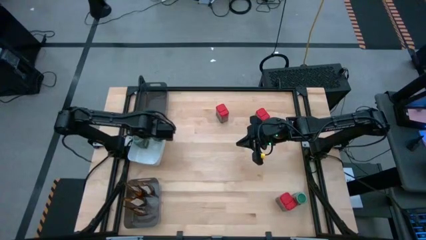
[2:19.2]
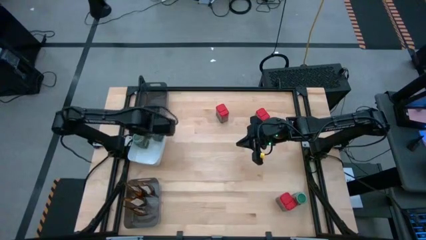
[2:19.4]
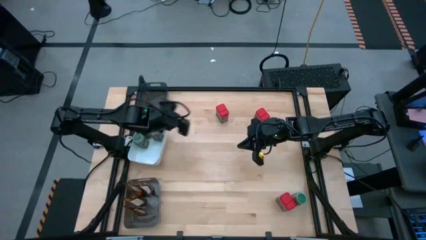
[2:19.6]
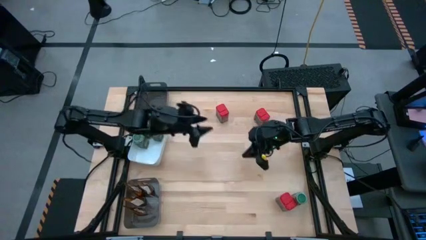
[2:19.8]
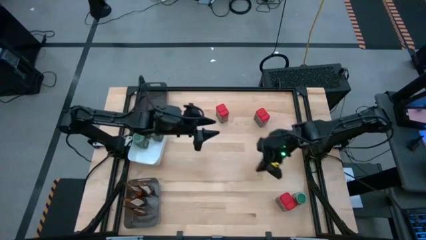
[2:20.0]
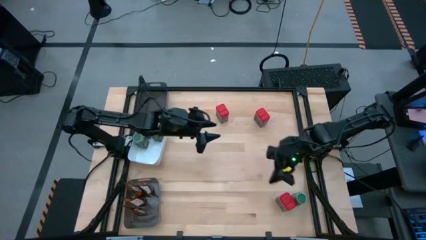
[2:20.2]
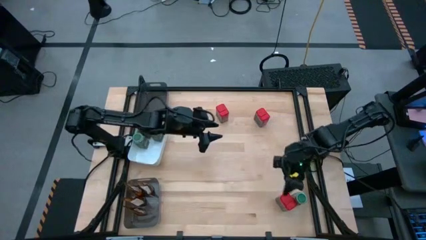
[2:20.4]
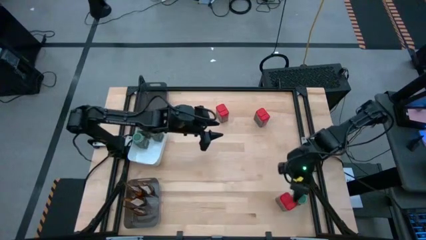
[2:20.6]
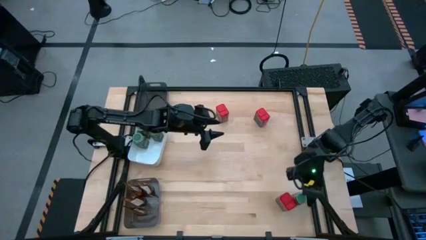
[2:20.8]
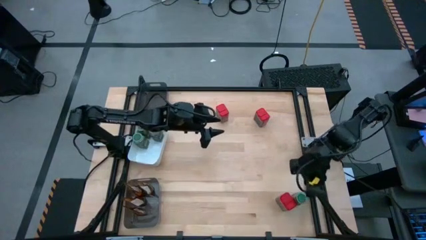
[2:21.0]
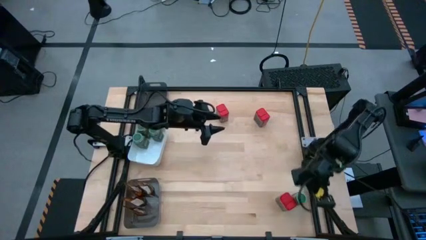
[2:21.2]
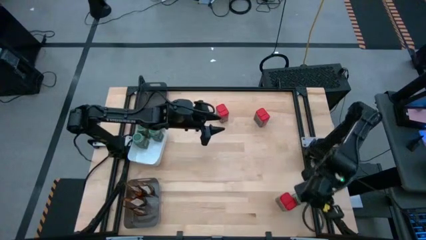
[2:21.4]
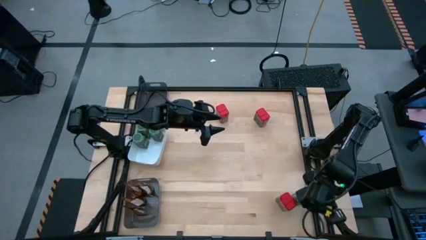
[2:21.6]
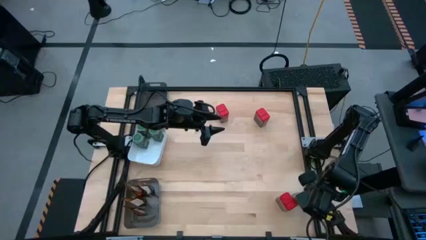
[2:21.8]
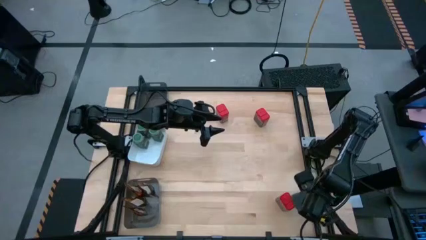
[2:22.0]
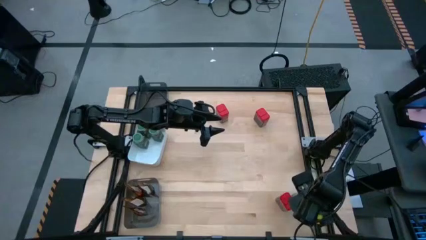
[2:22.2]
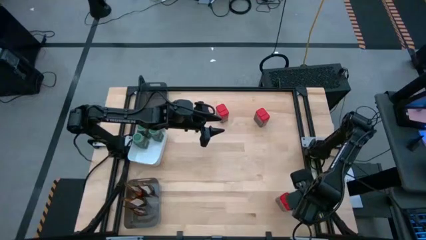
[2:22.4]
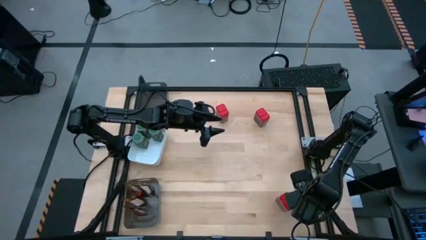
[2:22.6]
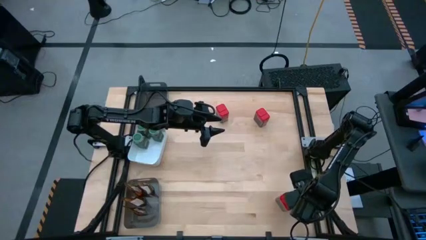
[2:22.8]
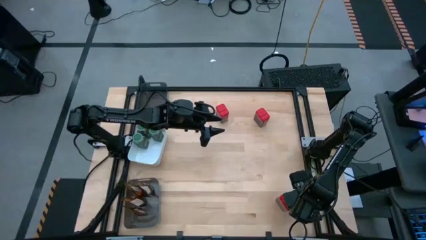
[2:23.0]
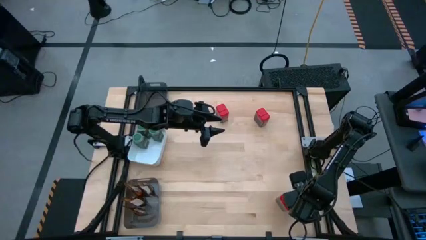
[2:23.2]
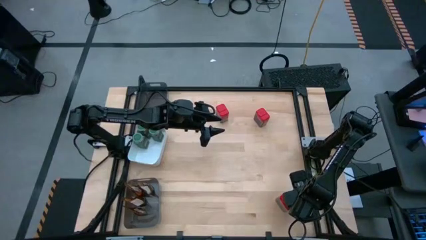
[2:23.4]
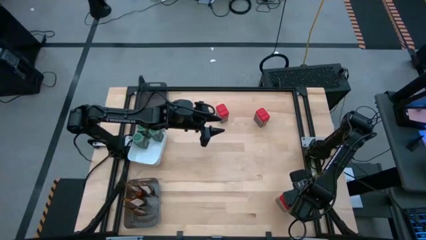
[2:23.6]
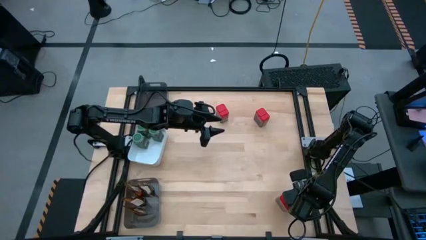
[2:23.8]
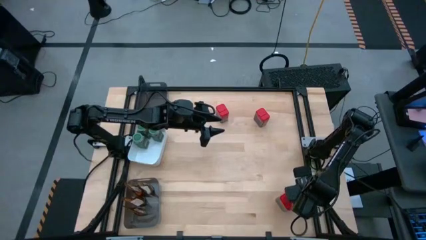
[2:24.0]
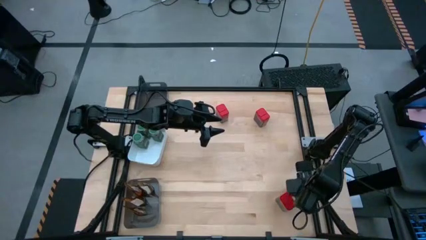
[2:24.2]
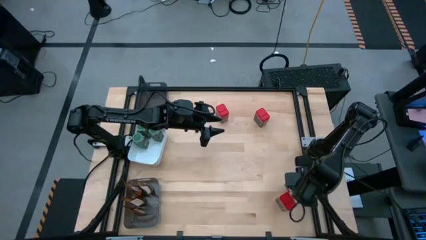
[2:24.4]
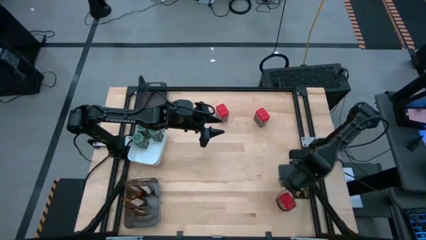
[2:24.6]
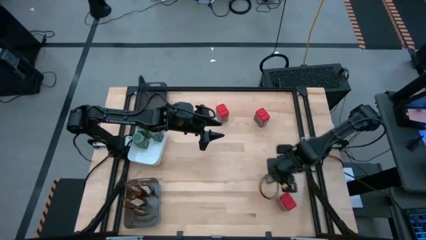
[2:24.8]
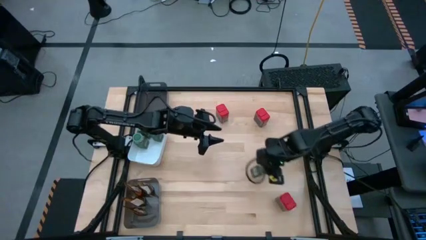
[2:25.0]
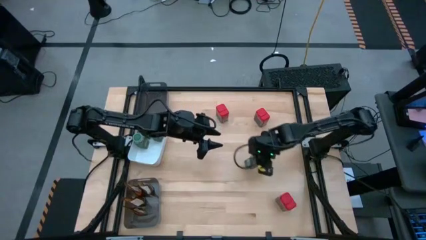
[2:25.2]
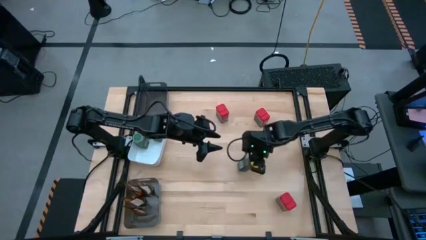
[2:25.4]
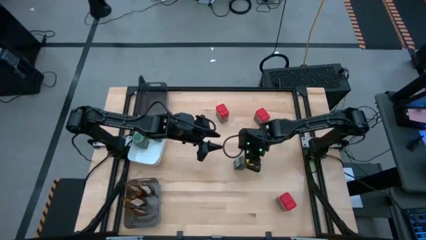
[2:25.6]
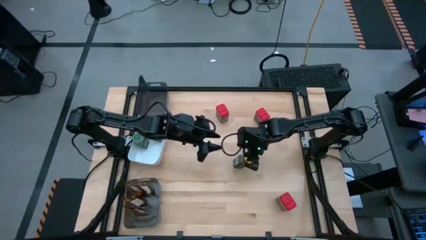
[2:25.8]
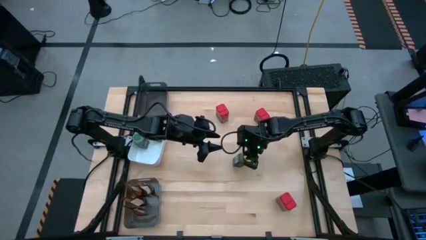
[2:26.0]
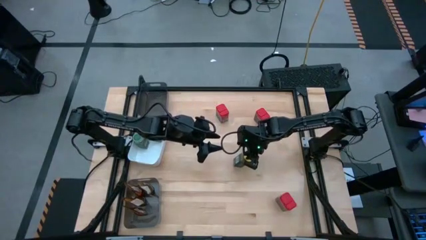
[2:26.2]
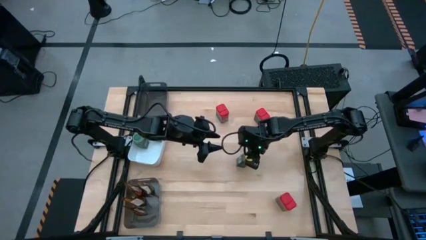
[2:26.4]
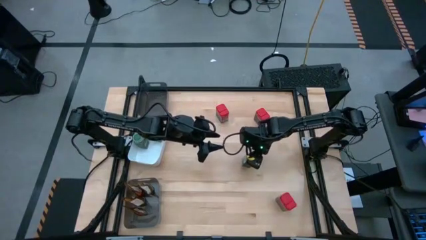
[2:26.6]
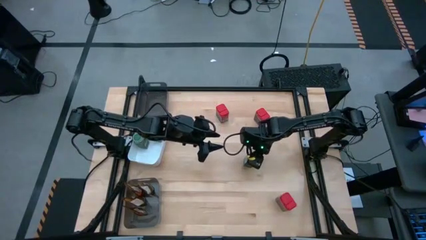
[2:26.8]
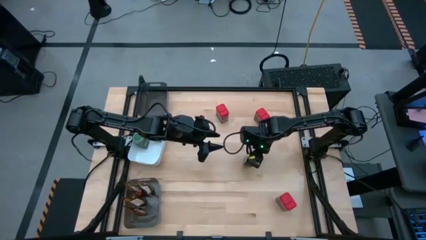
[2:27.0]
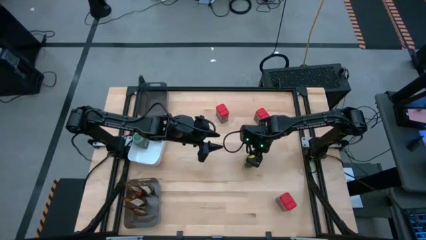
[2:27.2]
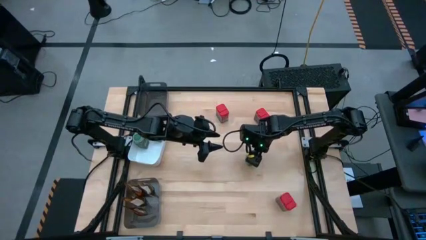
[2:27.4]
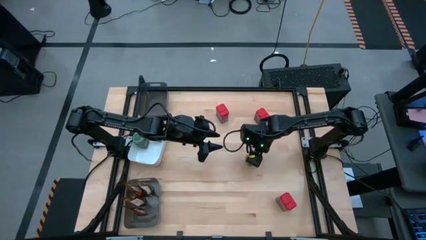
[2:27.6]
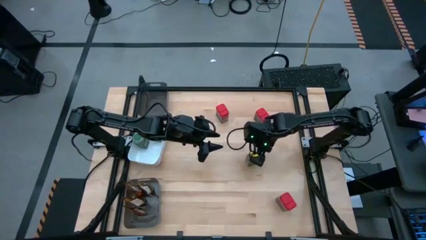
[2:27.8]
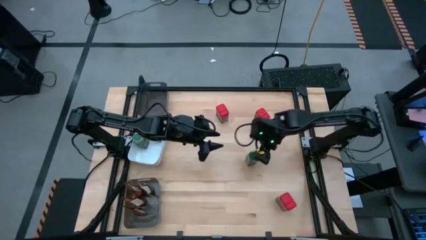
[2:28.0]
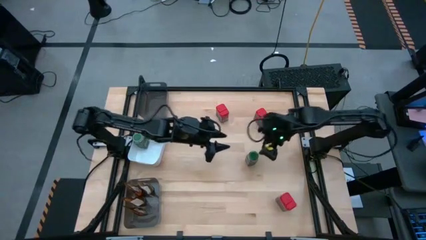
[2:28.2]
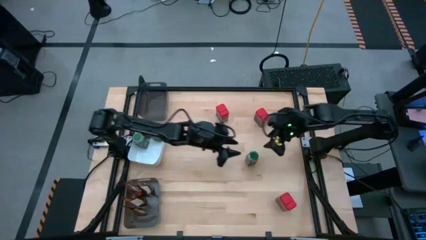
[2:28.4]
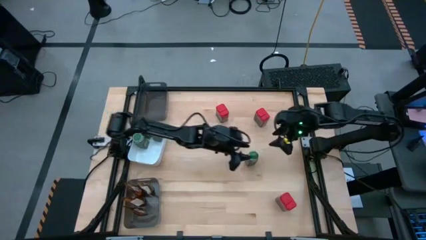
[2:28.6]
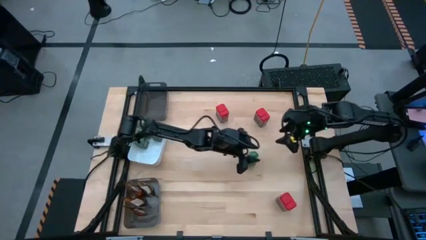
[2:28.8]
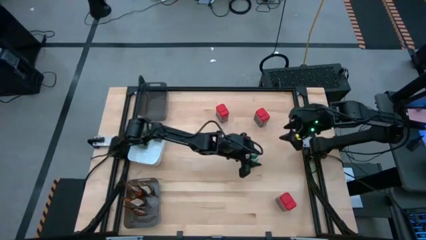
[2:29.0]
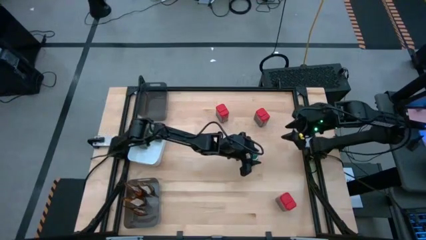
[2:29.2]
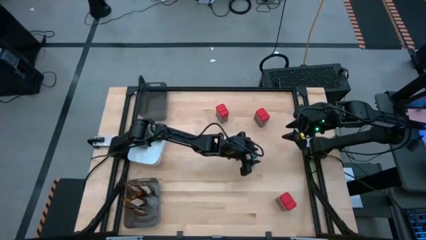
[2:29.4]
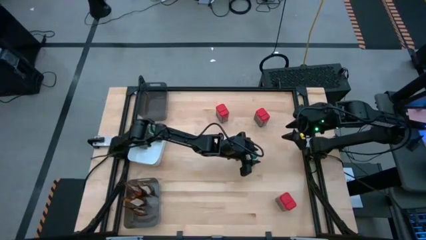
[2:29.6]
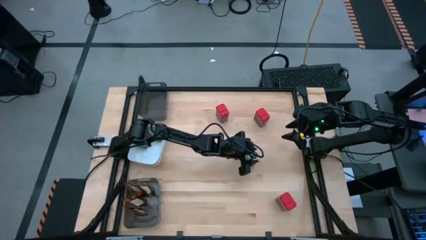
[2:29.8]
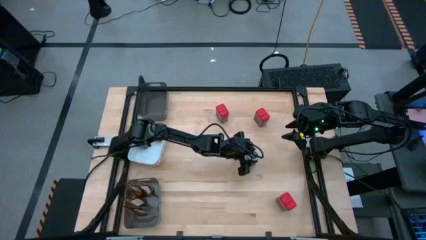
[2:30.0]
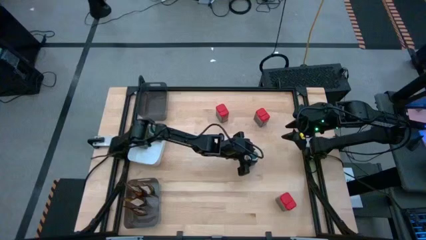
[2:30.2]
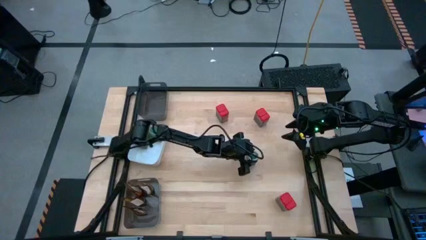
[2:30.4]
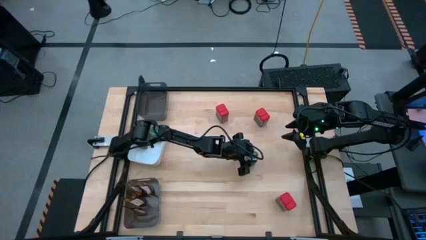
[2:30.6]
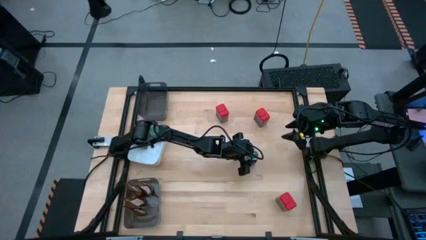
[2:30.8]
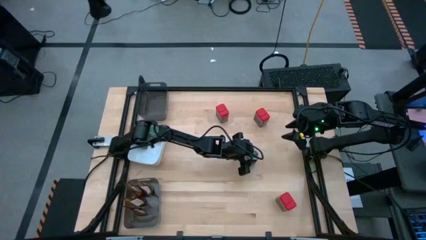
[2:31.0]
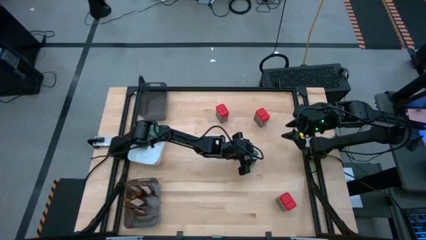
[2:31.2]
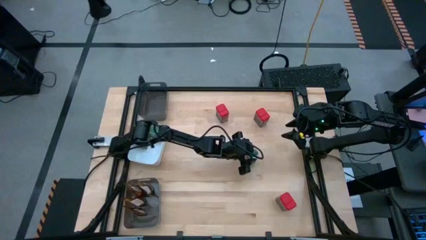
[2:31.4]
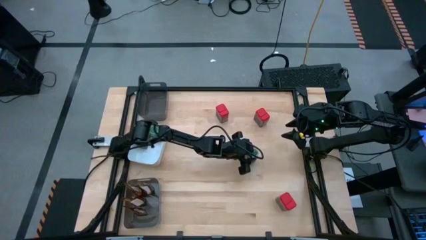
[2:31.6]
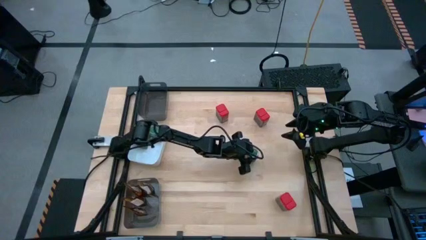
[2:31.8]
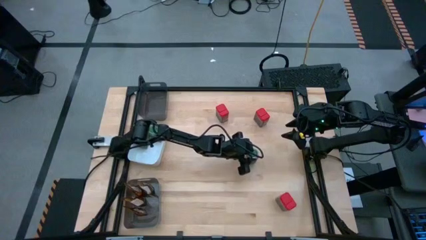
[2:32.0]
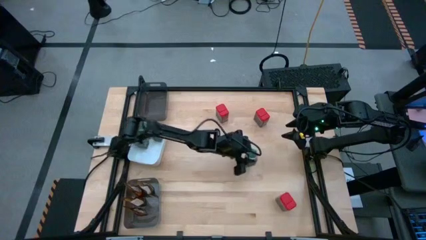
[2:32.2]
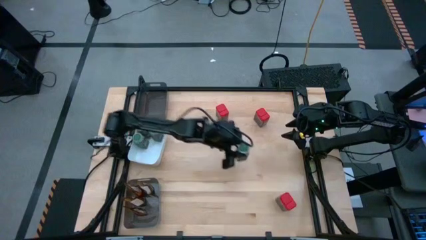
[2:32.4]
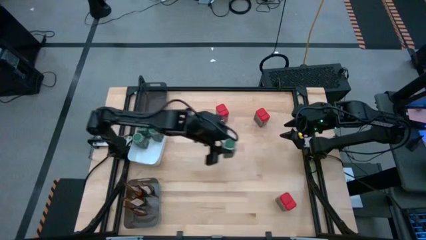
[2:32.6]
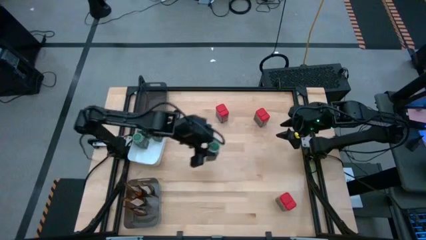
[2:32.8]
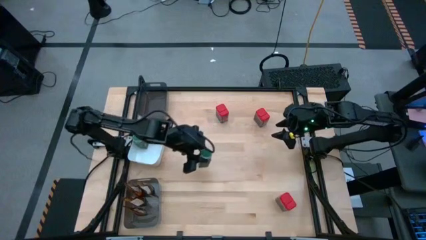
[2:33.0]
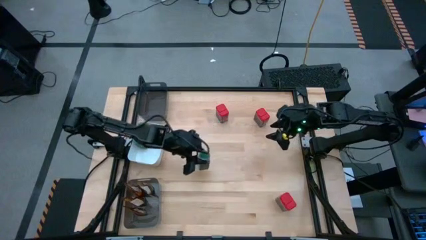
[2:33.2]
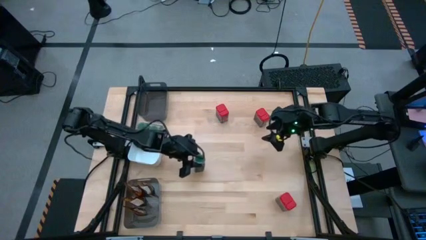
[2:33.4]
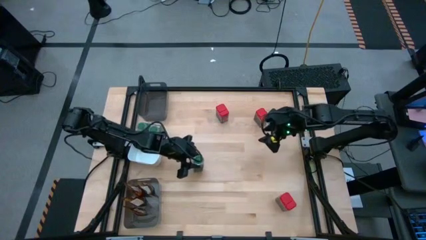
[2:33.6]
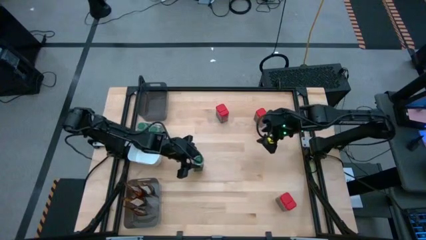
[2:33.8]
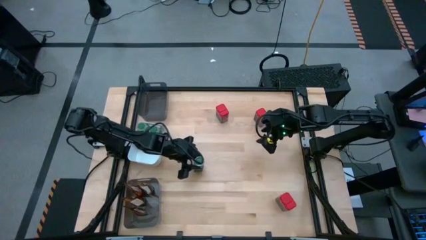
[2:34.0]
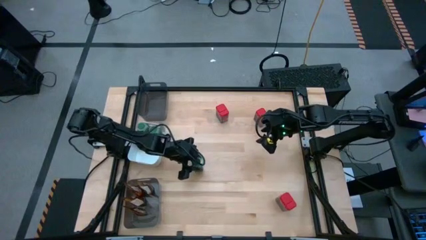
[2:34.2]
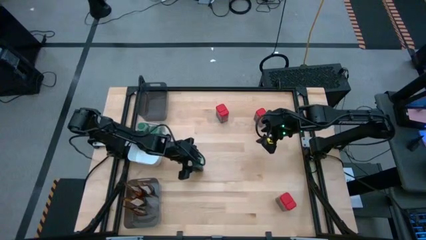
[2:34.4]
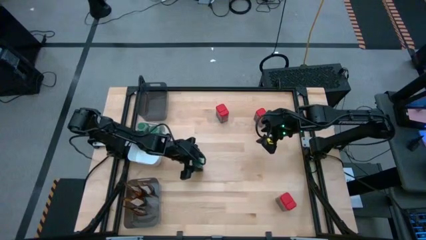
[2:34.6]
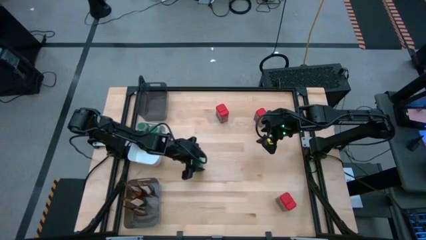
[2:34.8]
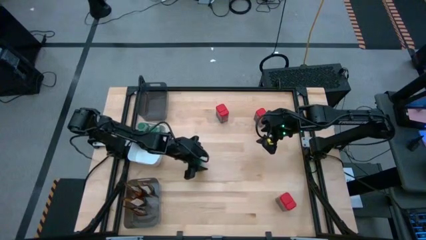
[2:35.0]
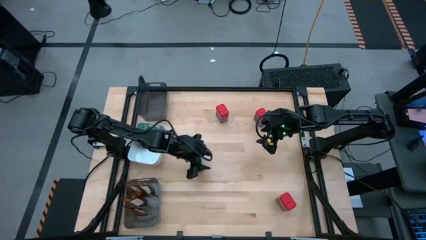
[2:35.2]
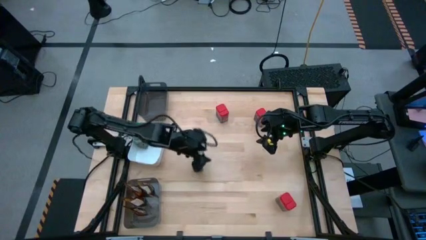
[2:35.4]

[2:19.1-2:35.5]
Task: Sort spices by type
Put the green bottle seasoning into the white bin

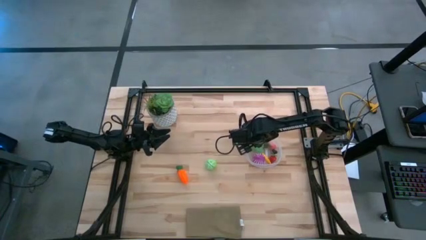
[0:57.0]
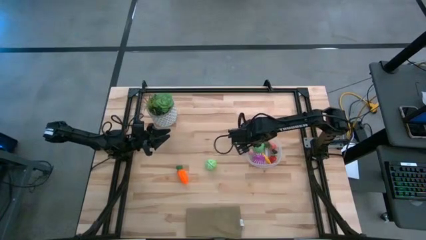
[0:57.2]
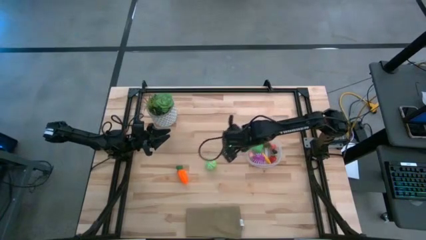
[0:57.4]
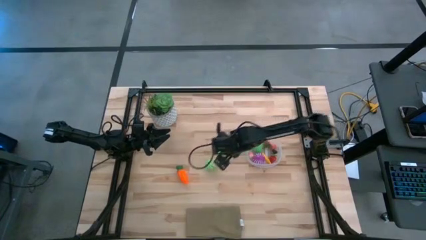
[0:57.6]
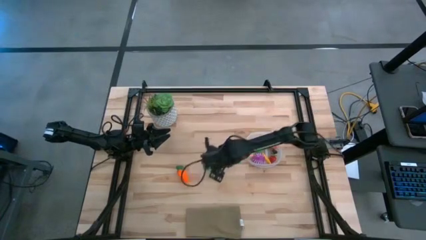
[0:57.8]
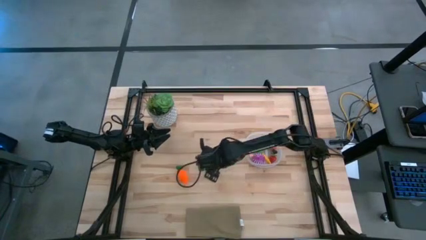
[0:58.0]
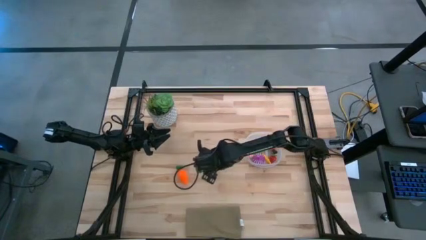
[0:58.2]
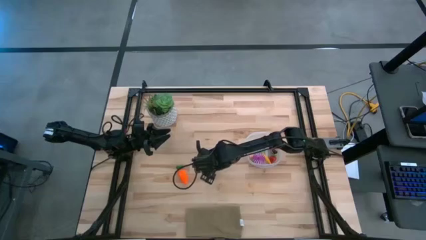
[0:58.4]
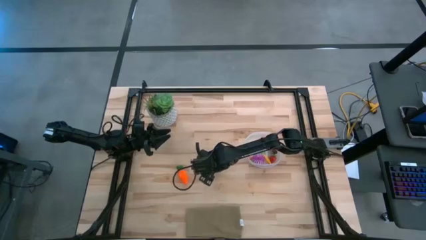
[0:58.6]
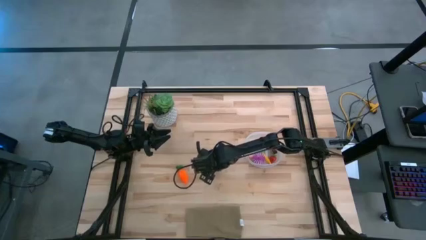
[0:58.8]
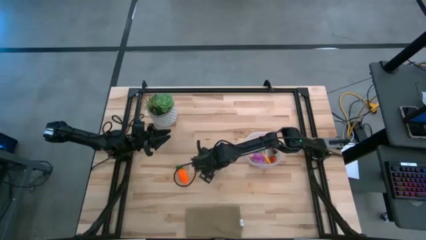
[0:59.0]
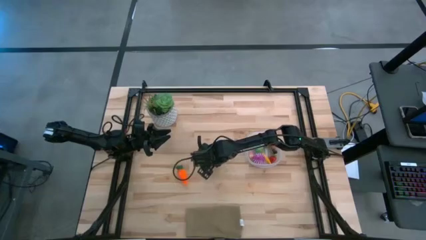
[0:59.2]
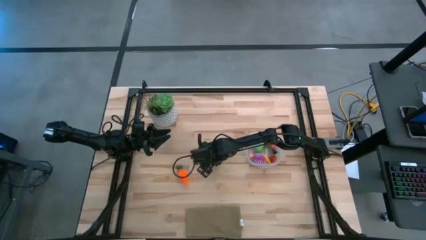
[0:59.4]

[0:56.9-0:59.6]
Task: Pick and placing Produce into tupperware
Put the green cabbage into the transparent container
